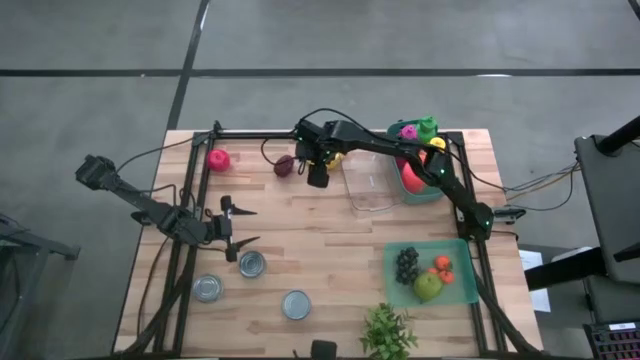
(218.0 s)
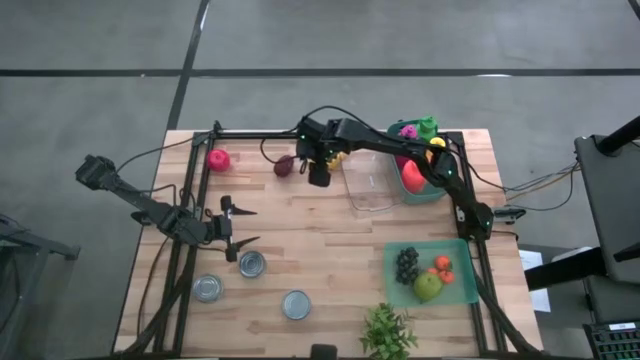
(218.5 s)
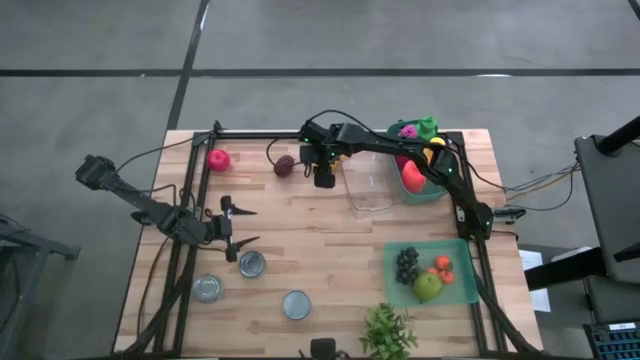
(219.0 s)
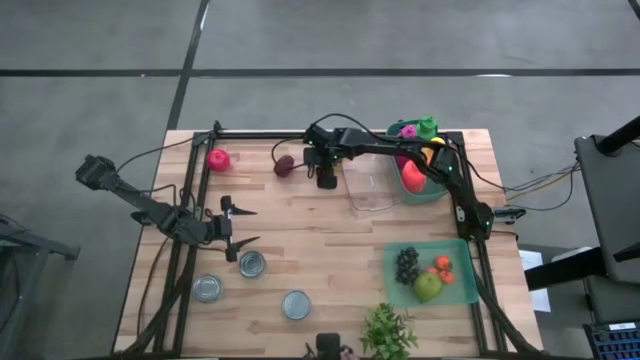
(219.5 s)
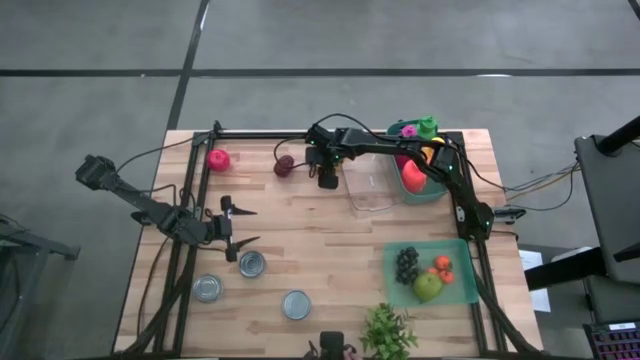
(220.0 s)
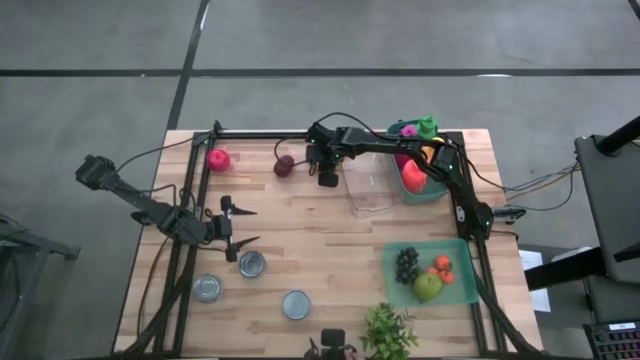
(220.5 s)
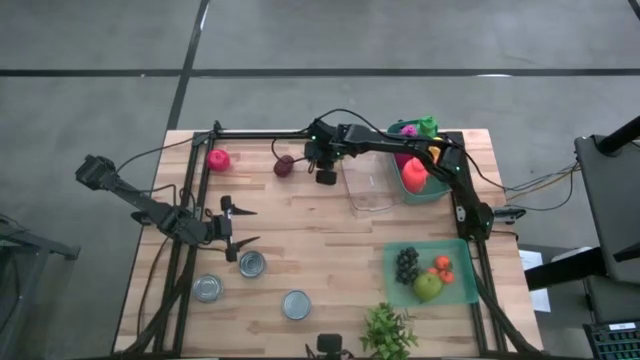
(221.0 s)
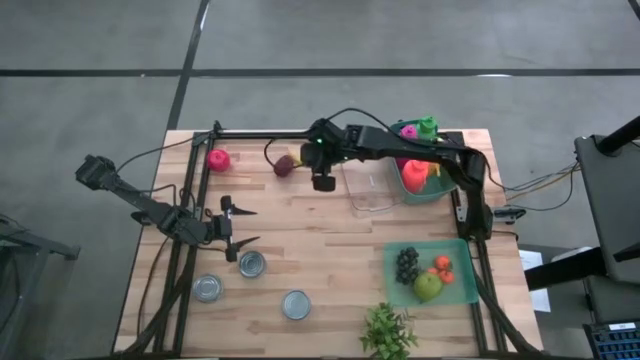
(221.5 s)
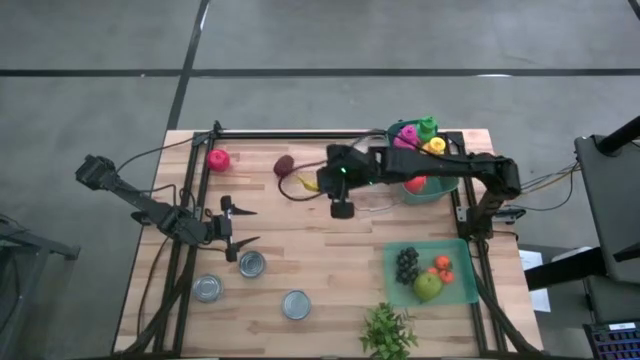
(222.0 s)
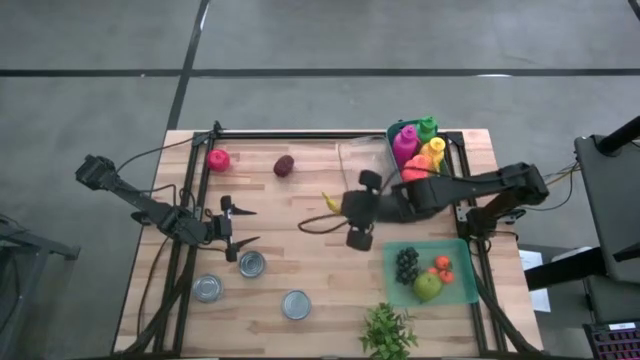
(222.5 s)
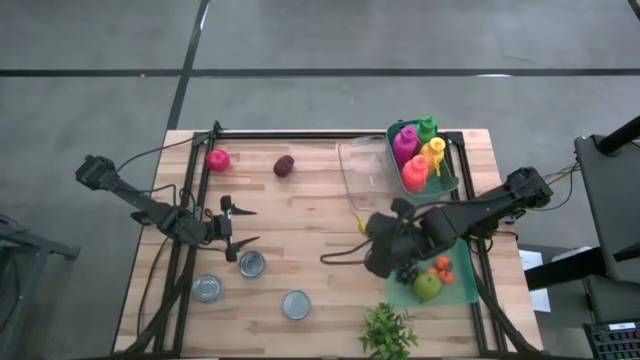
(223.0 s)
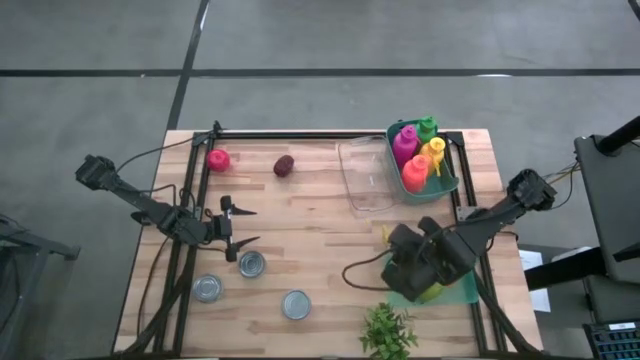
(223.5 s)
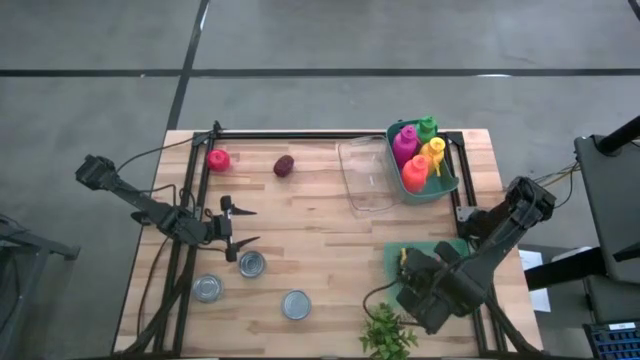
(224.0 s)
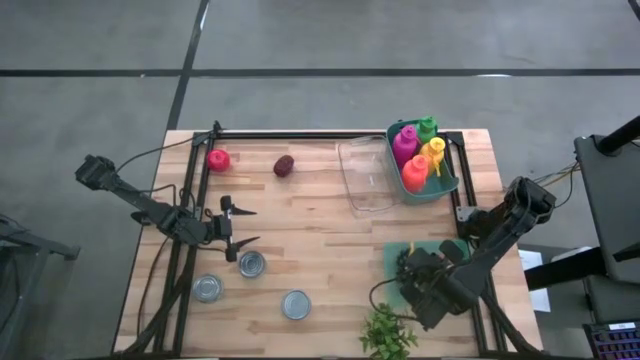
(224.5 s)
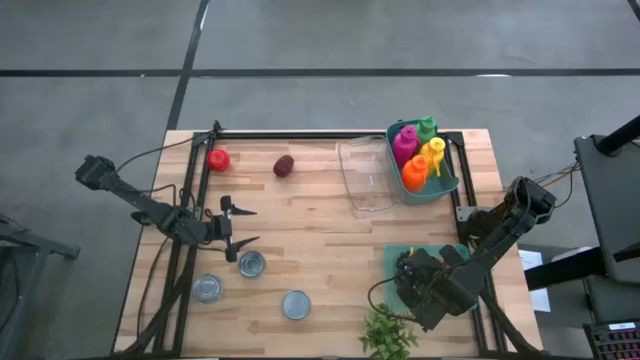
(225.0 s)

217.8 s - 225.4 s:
Task: Pick & Place Food Item
Put the banana into the green transparent bin

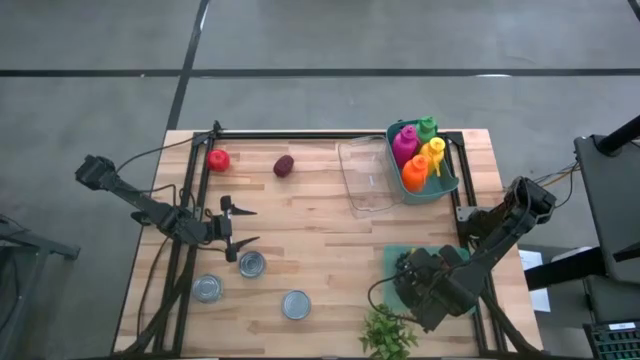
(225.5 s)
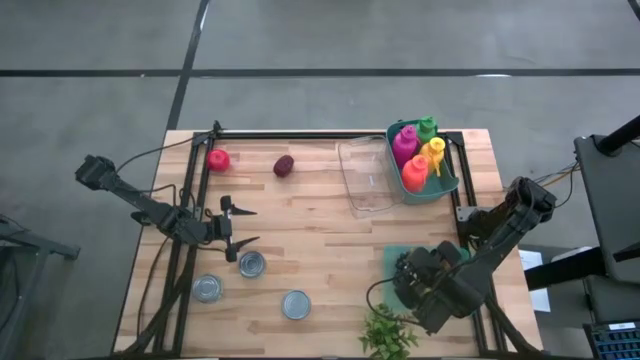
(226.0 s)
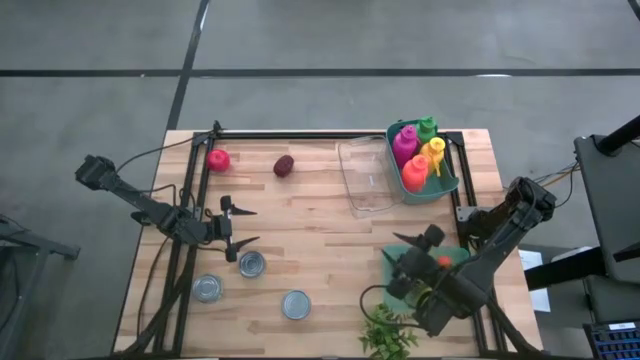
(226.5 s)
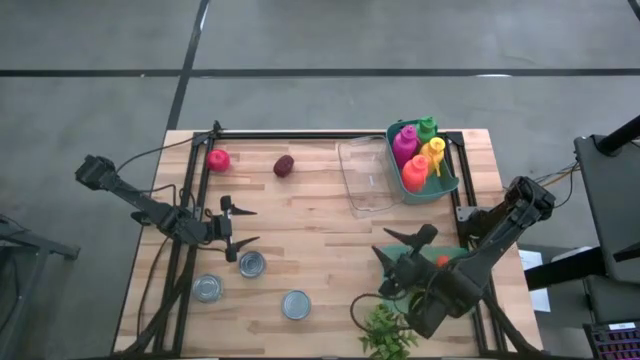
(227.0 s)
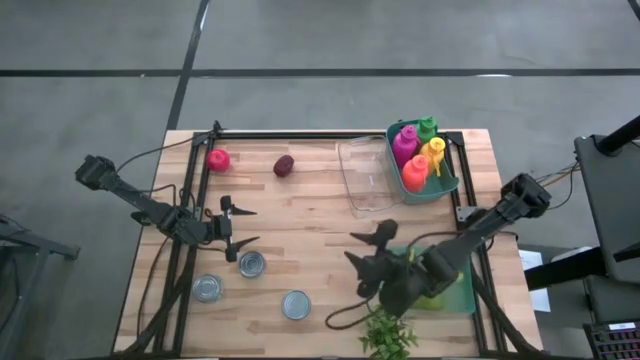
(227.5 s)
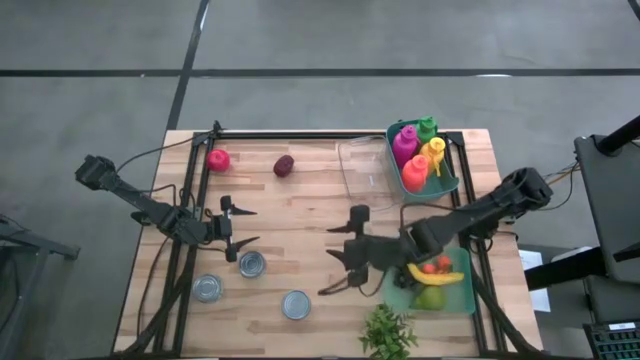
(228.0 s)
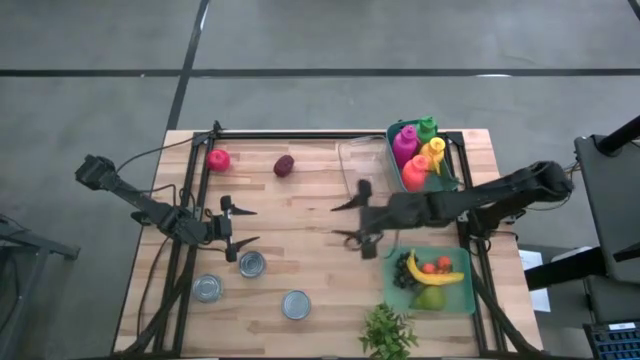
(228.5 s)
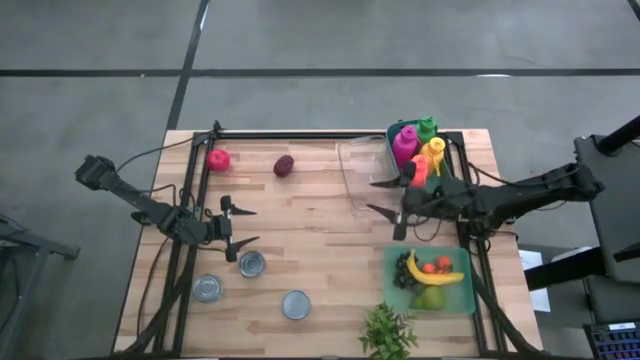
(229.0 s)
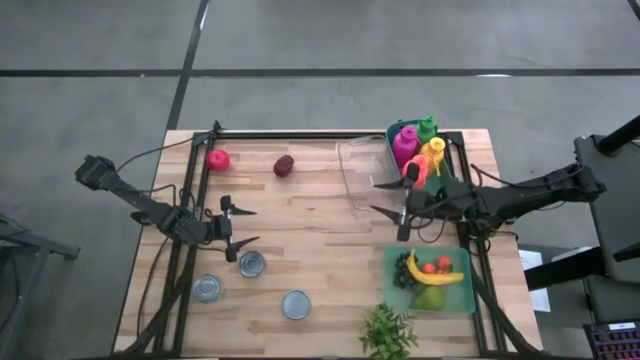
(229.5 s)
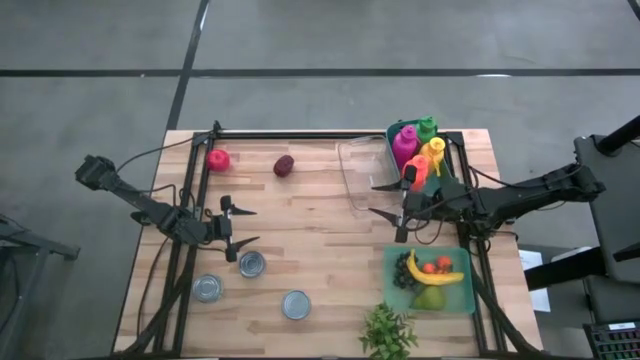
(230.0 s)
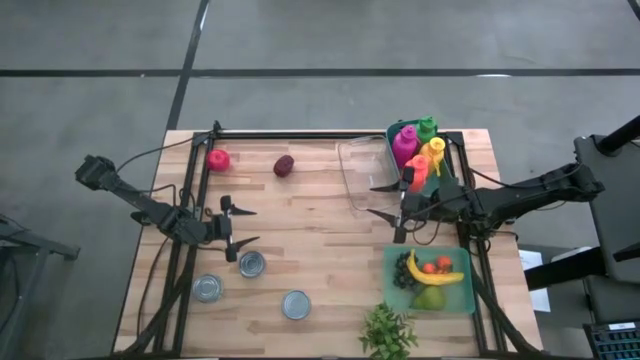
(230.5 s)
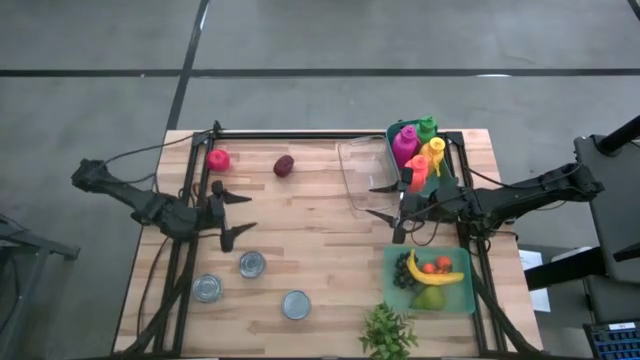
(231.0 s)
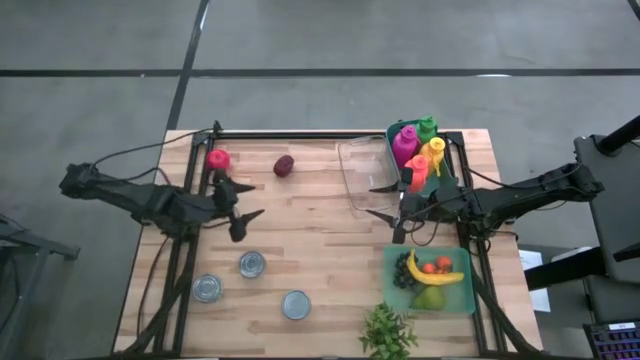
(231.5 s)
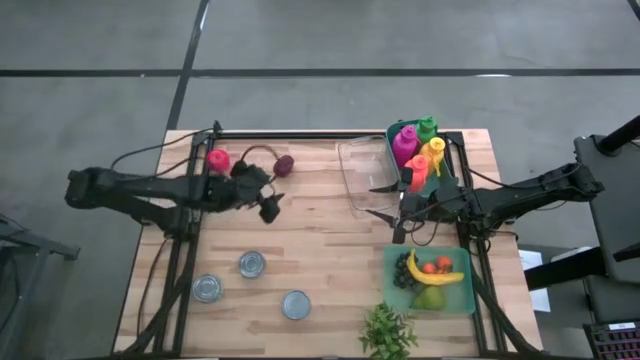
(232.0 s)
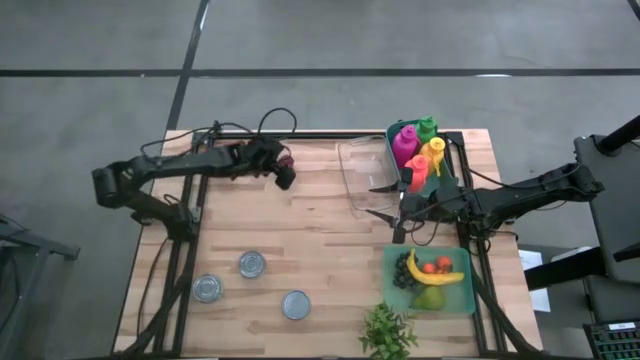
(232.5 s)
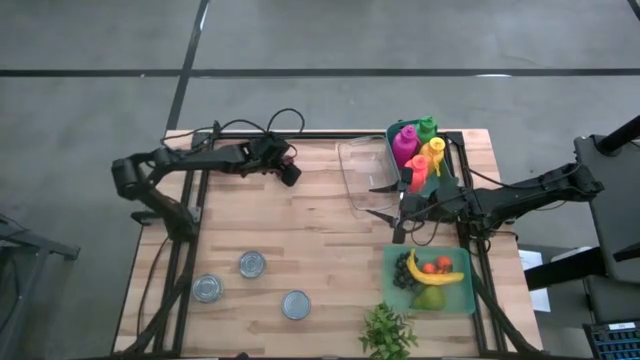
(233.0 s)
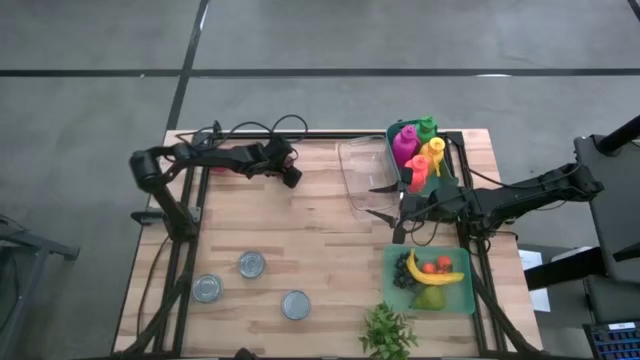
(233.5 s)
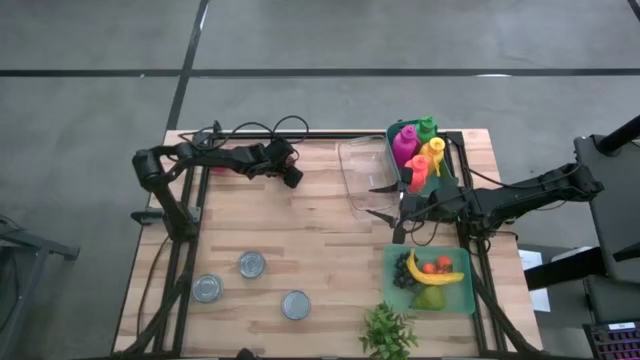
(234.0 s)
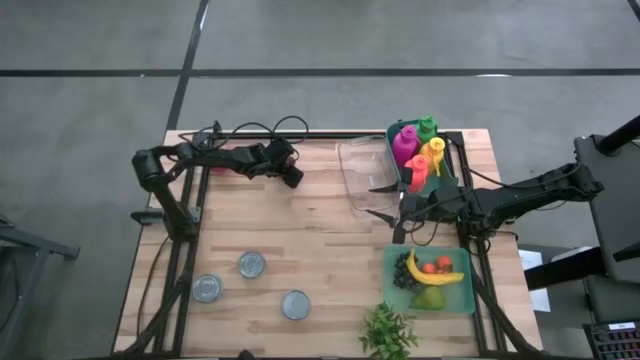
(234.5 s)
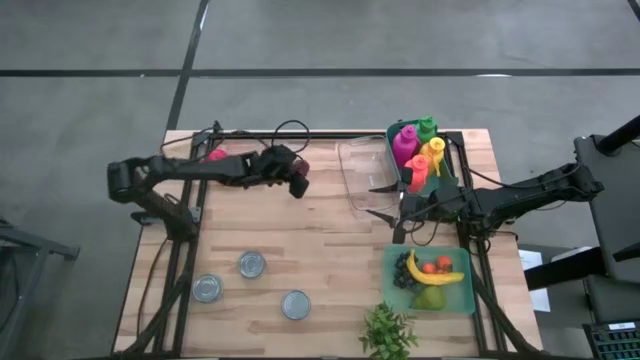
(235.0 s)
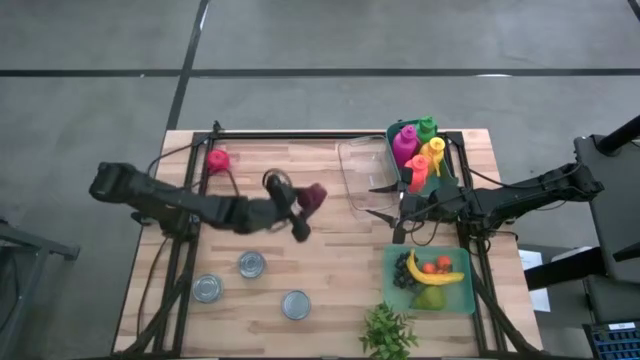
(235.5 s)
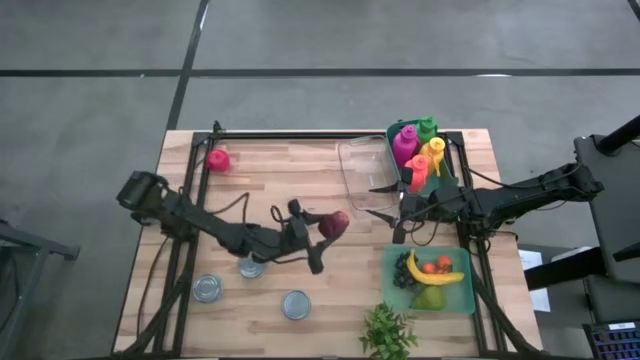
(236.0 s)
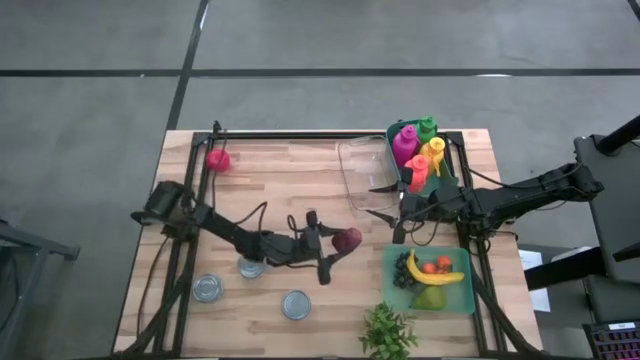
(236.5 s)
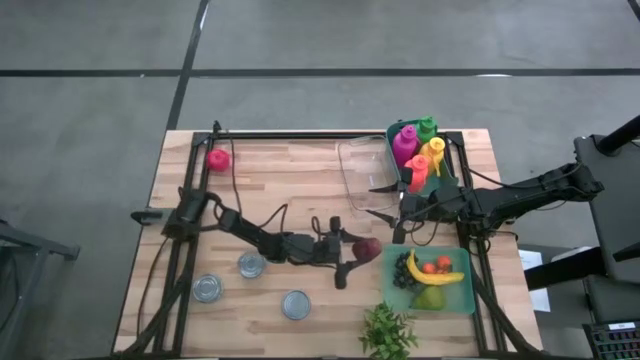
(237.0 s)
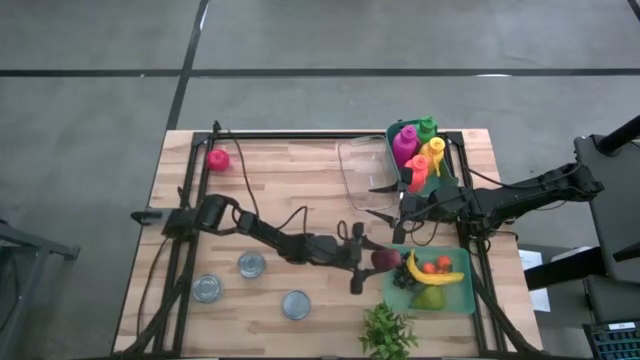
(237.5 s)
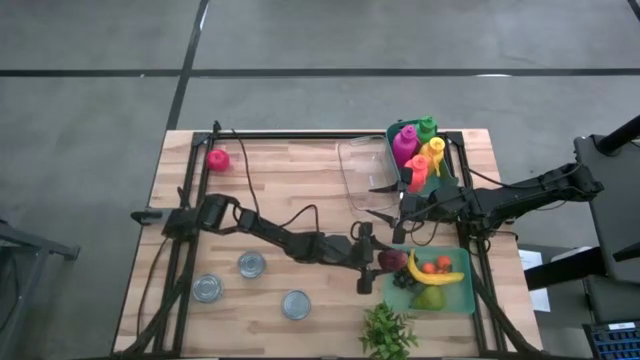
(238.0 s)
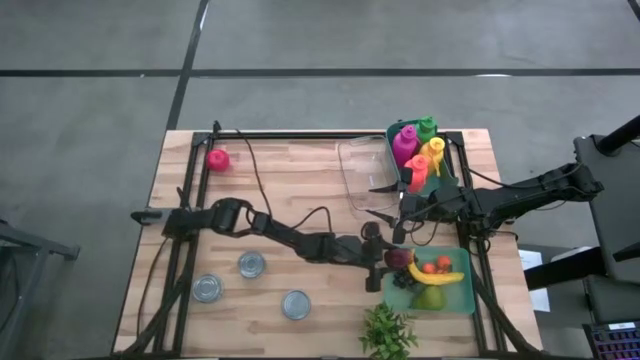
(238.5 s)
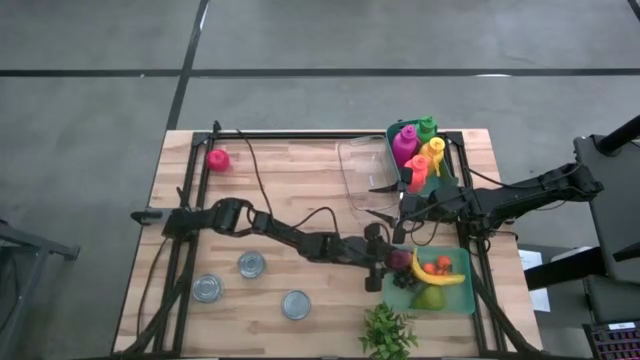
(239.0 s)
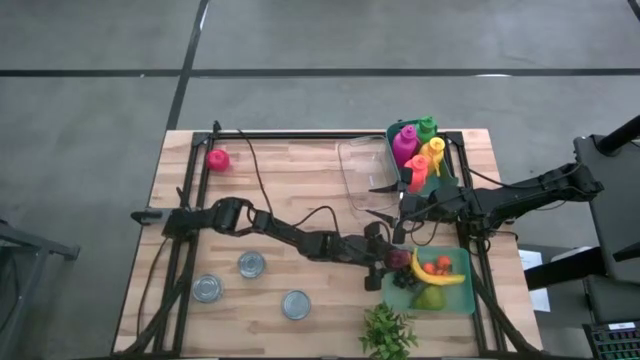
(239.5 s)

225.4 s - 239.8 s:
Put the dark red apple into the green transparent bin
